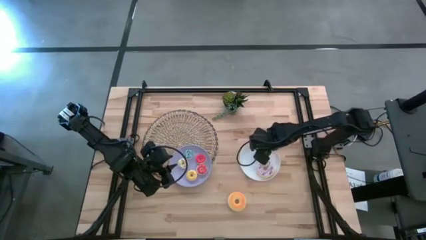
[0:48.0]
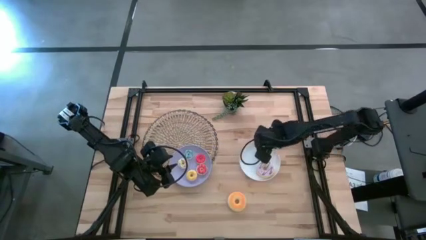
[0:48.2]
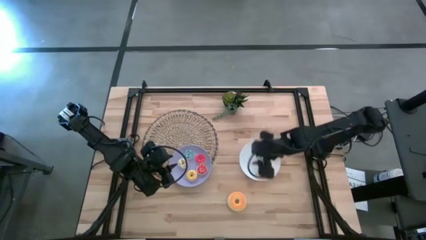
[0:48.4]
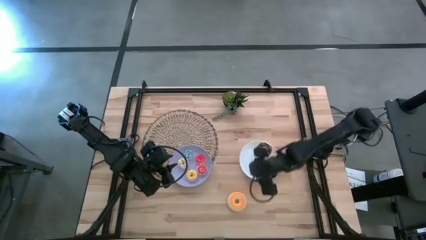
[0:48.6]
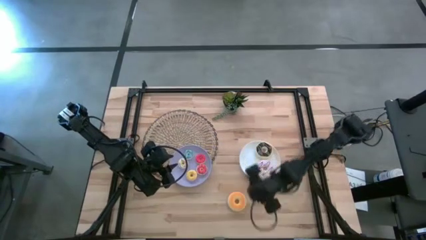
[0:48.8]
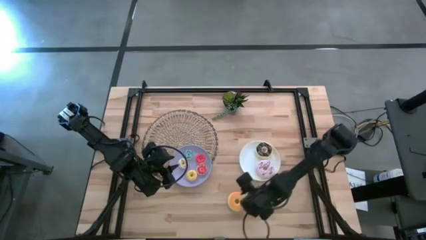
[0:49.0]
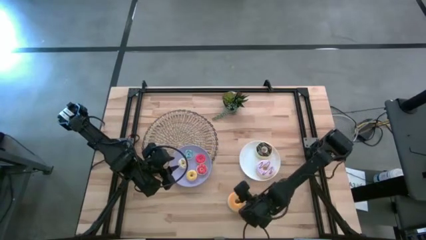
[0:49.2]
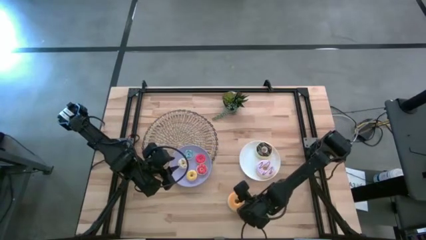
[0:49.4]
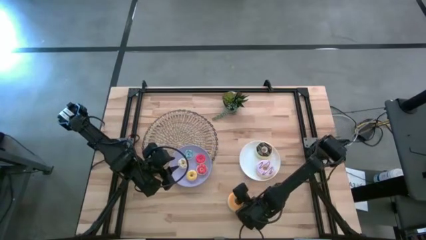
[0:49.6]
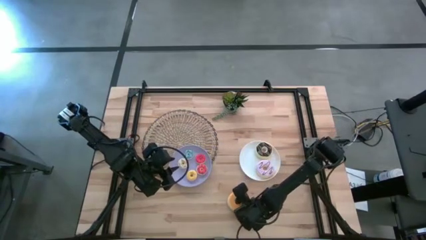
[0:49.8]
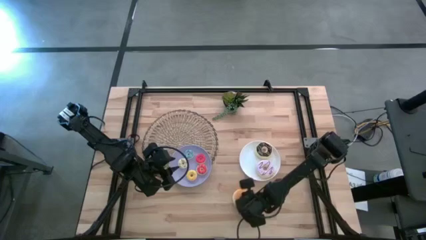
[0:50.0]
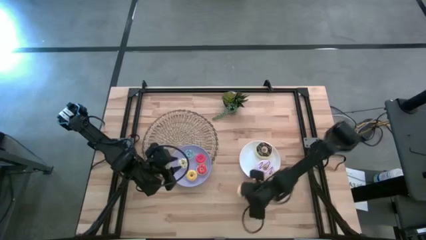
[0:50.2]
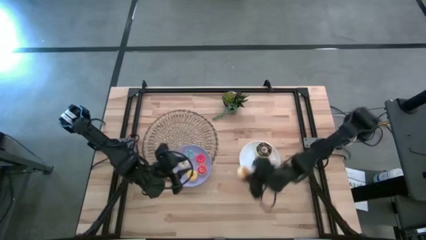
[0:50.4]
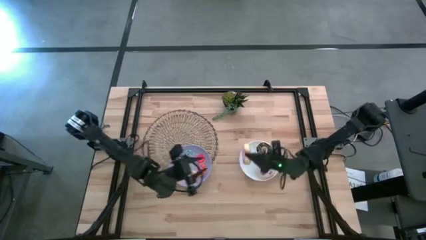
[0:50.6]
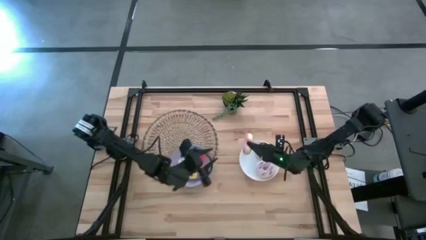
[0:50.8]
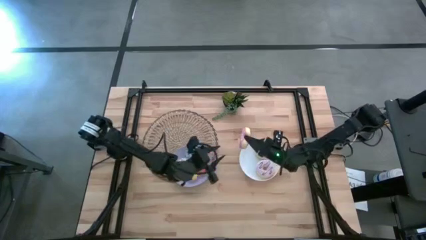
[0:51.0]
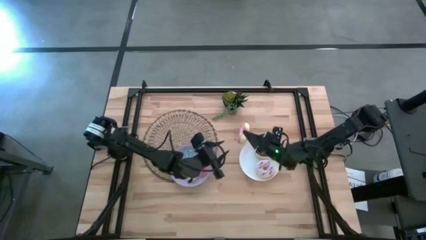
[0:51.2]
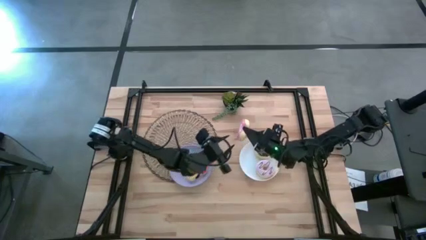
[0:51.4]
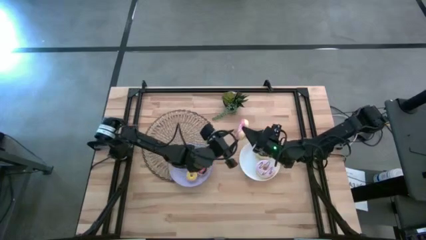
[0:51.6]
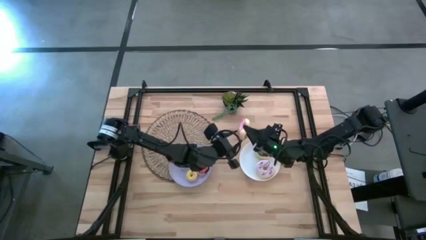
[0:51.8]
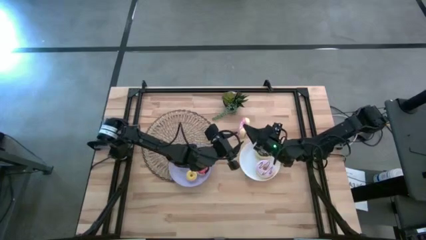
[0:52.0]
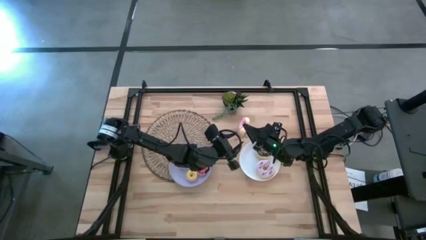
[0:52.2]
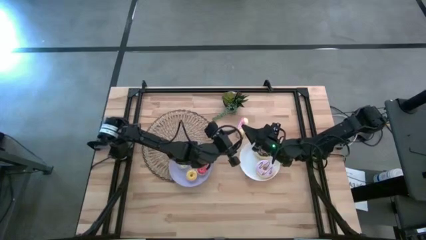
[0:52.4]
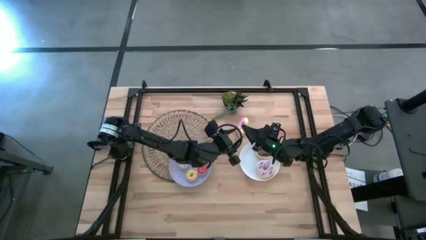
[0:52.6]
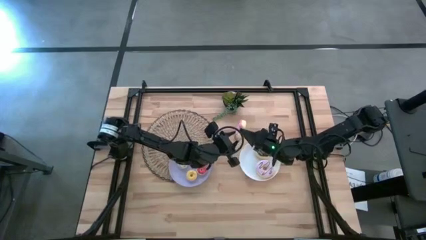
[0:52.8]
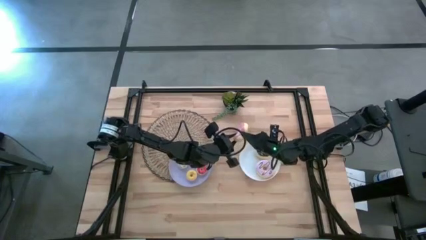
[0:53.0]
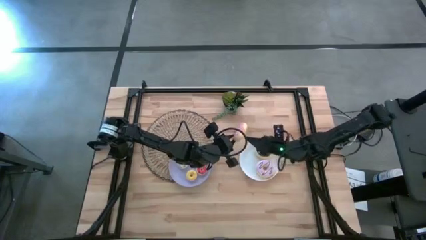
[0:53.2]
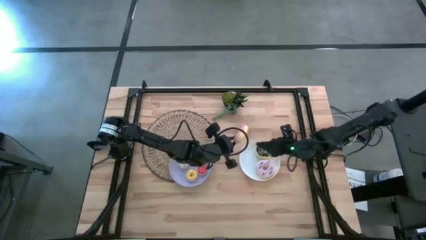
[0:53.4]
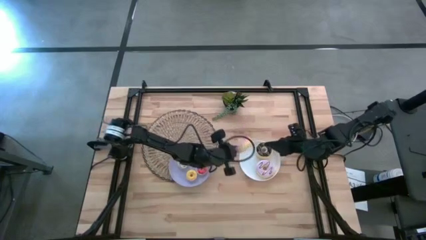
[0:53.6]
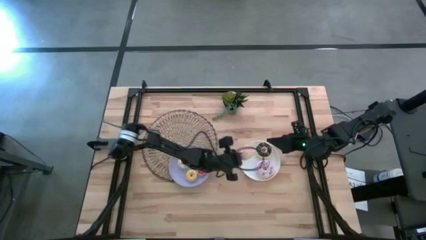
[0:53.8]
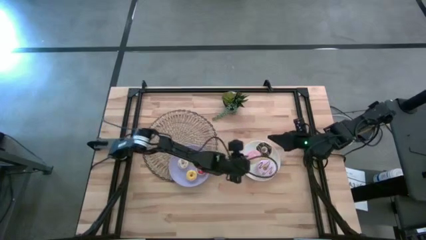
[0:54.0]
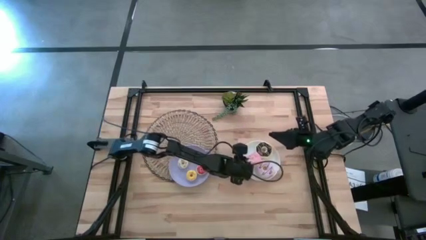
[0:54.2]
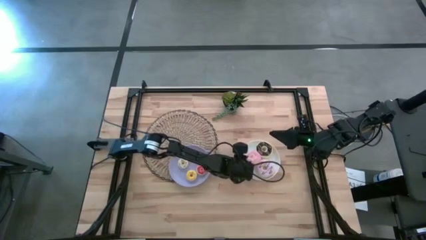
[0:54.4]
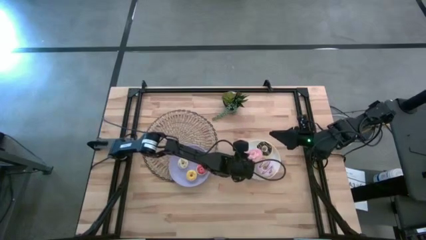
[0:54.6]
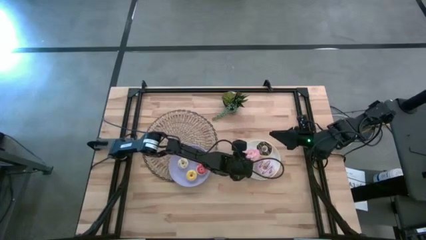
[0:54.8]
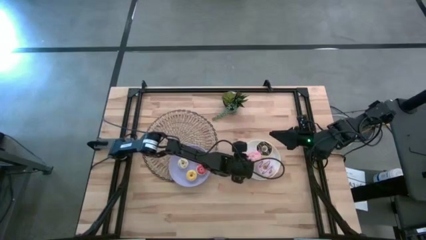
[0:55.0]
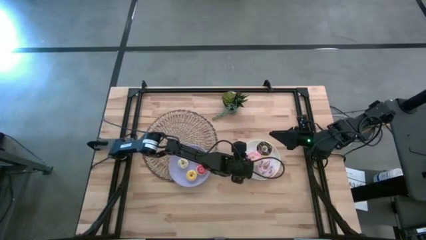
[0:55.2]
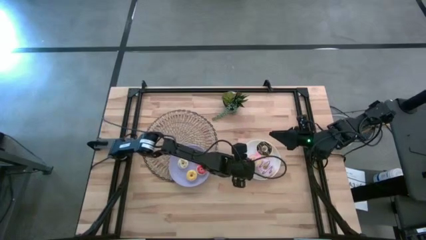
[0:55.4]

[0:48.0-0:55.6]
Task: Pick & Place donuts
Put the large pink donut on the white plate

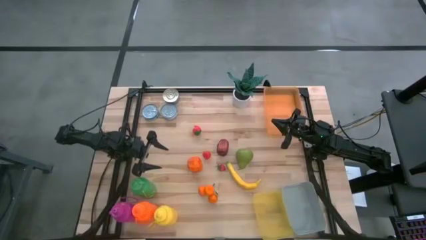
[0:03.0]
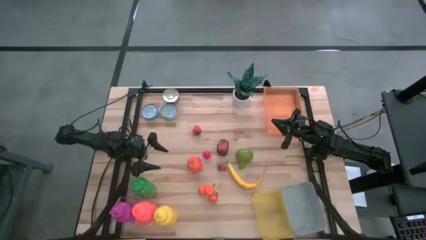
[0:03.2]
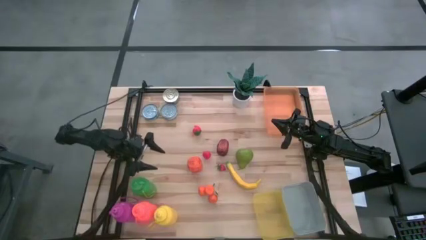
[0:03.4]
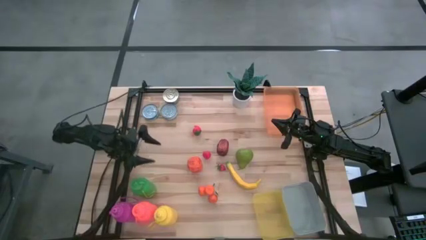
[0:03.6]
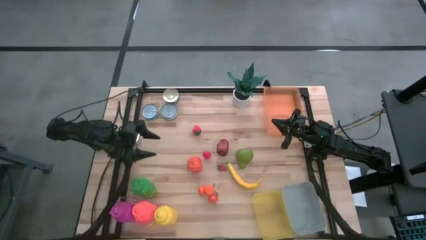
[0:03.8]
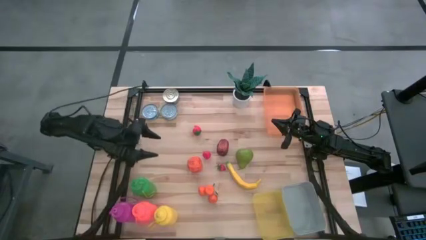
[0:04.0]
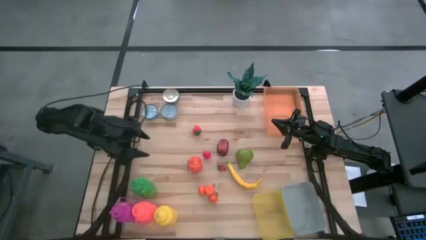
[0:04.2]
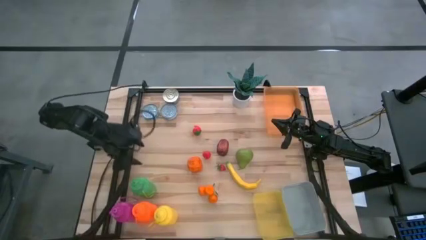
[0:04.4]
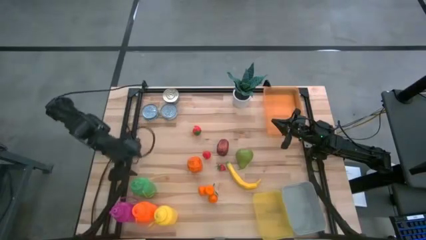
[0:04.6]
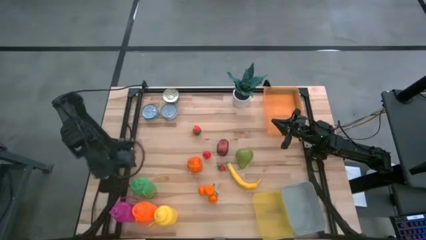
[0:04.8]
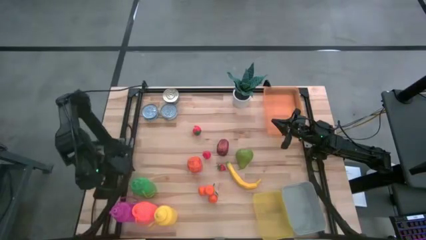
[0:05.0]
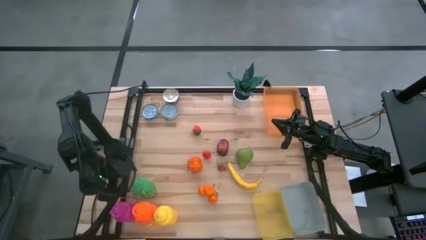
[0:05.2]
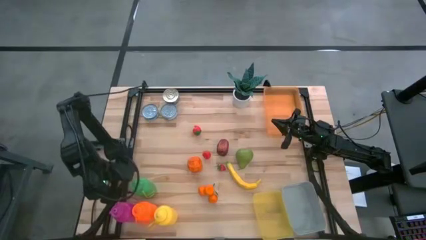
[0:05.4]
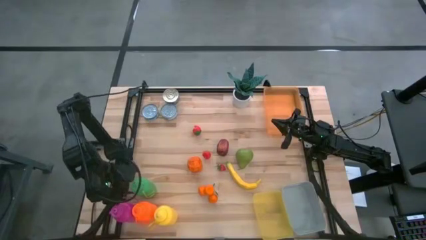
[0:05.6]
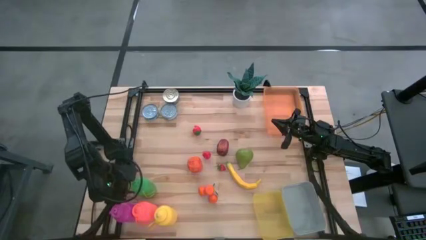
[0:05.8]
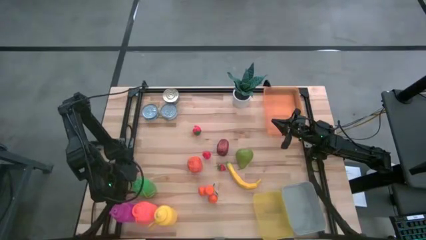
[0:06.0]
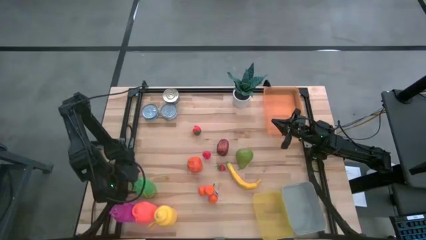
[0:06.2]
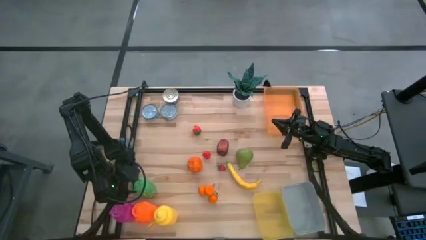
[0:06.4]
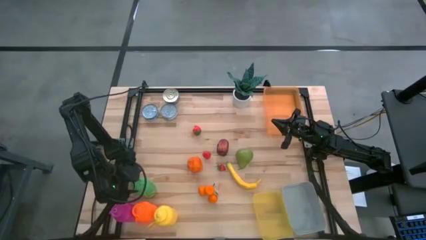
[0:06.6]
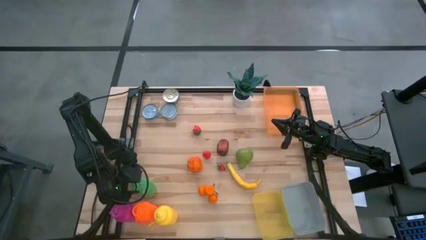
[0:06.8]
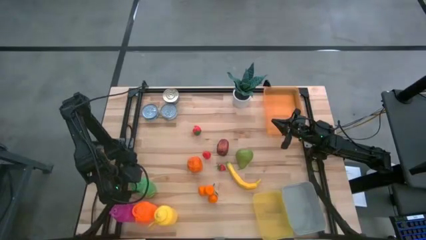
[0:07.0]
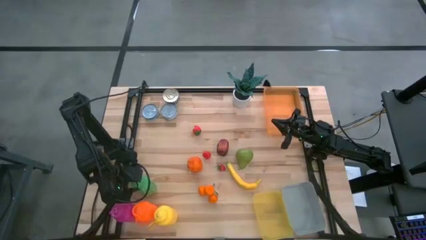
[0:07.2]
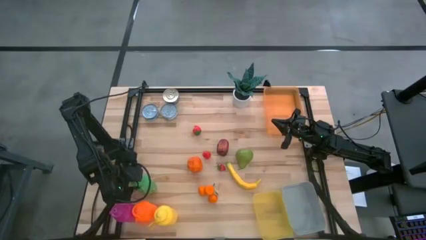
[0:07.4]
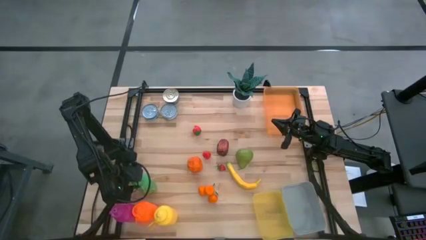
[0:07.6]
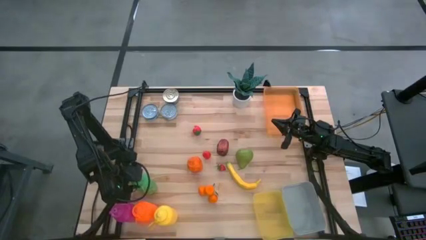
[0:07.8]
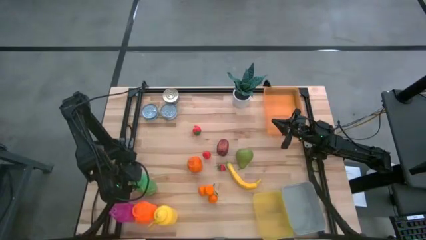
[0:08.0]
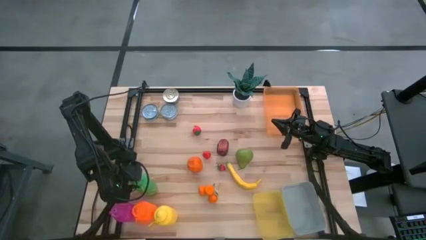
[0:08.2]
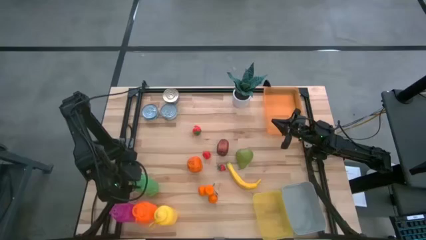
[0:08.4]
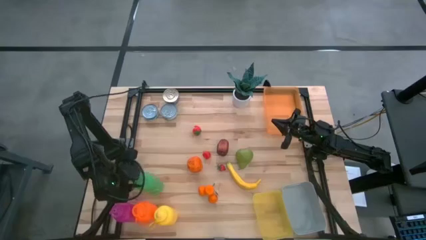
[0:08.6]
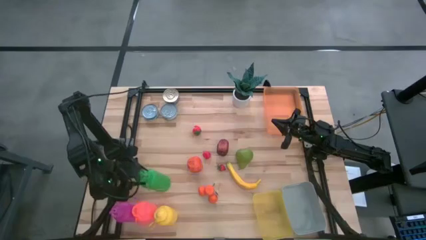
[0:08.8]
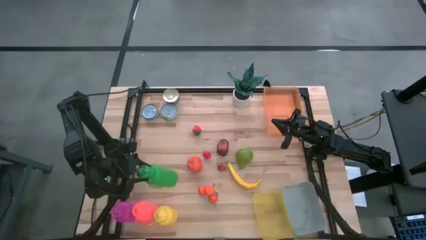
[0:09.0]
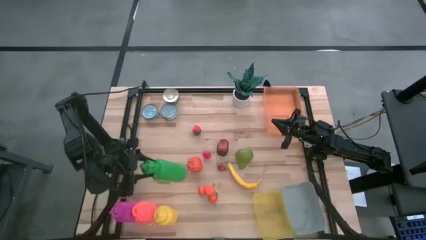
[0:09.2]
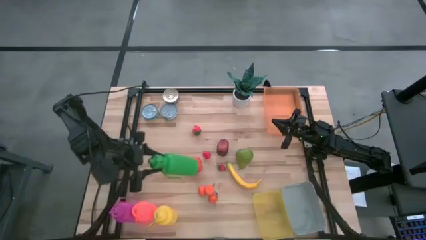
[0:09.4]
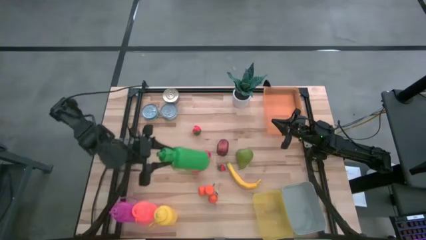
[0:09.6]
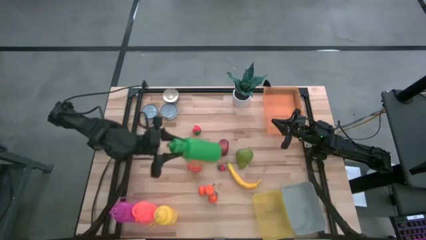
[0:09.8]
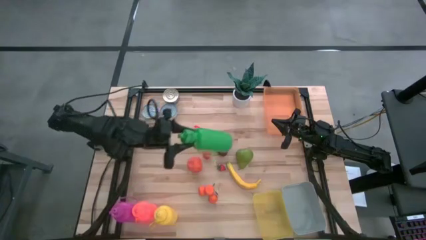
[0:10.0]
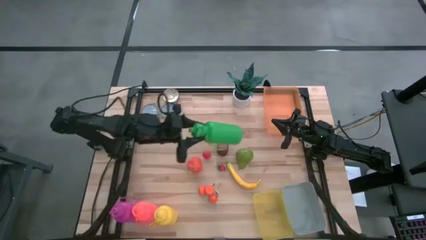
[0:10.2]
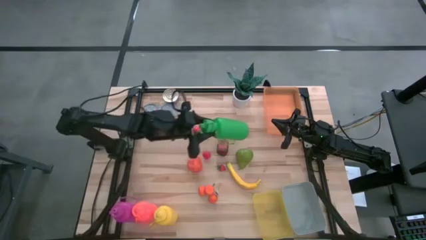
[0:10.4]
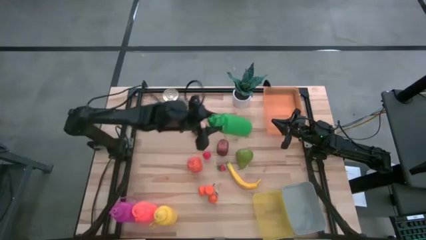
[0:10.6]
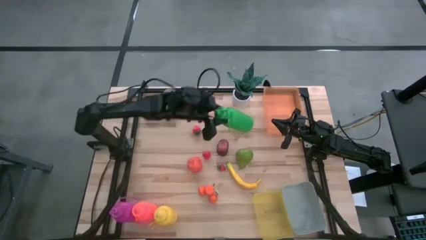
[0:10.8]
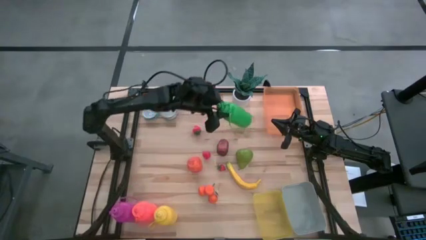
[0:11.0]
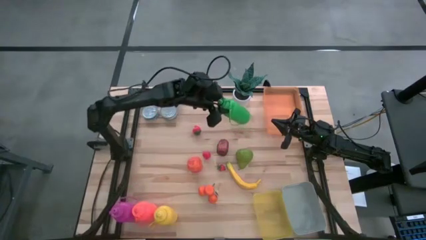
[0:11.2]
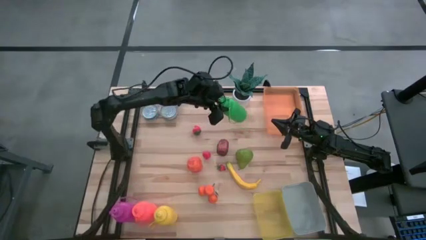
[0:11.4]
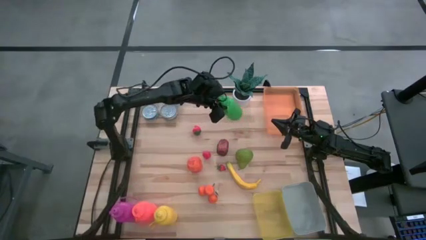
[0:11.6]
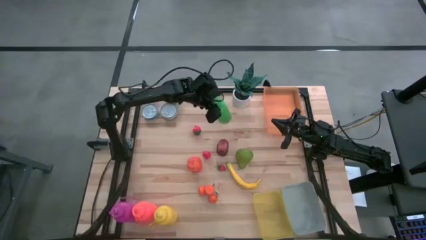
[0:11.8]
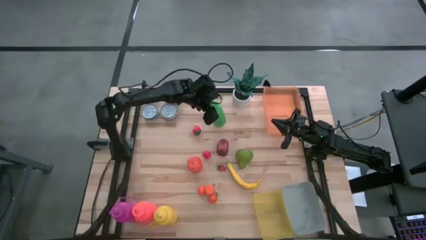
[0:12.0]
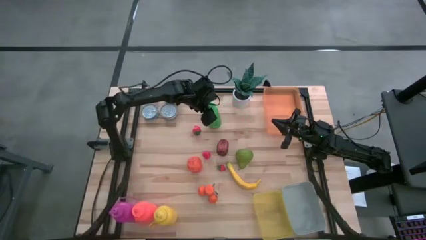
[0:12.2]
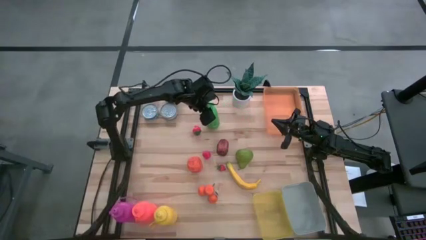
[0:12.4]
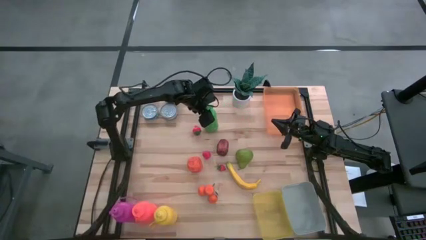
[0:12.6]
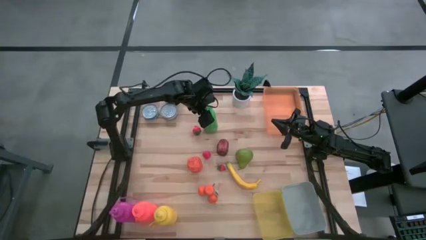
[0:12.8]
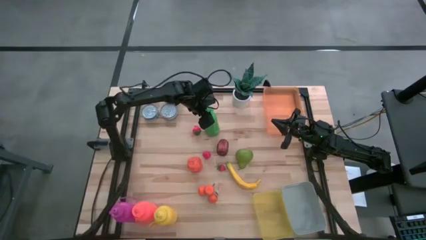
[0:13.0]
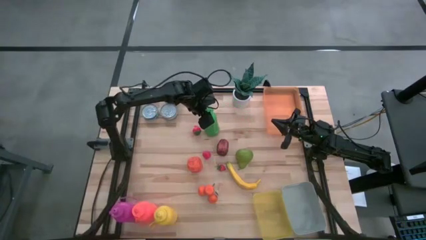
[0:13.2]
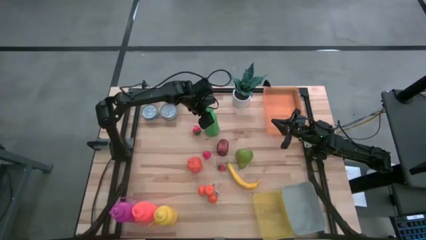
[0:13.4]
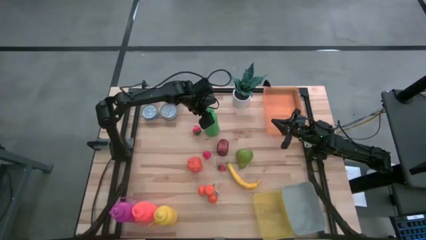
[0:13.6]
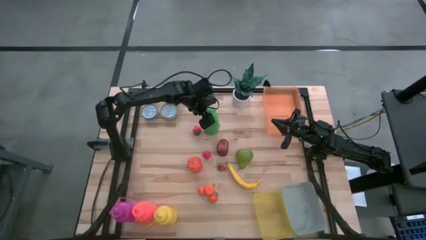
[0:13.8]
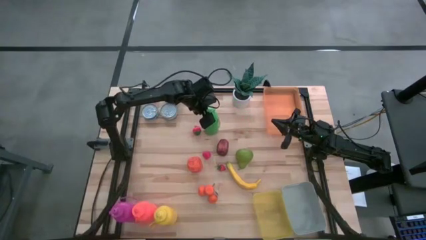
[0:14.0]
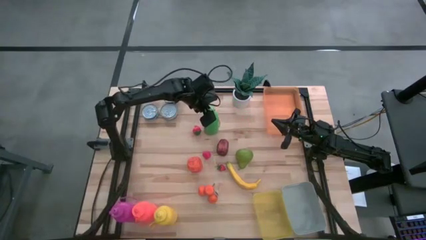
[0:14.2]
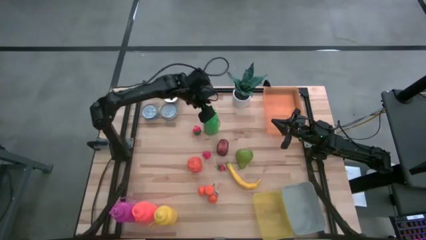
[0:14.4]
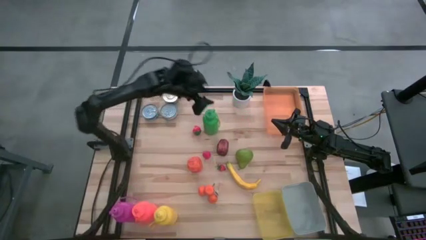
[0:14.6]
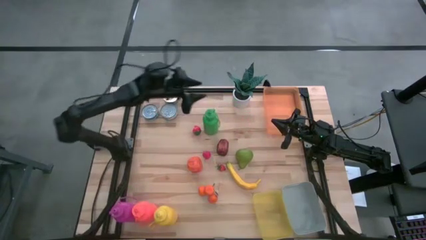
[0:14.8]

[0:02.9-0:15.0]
Task: Pick & Place Food Item
Put the green water bottle into the orange bin
